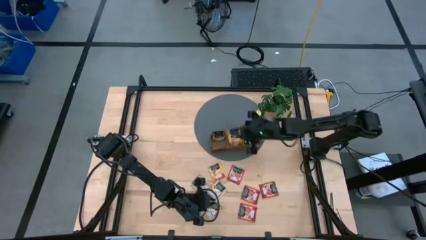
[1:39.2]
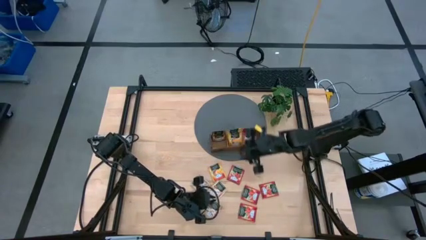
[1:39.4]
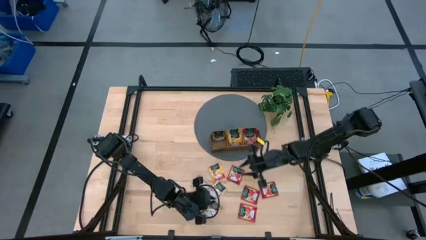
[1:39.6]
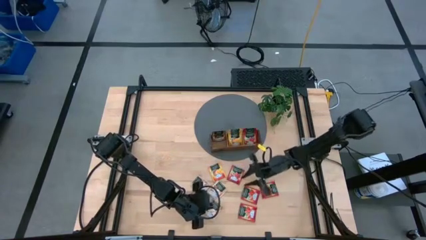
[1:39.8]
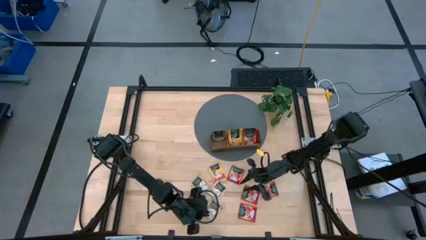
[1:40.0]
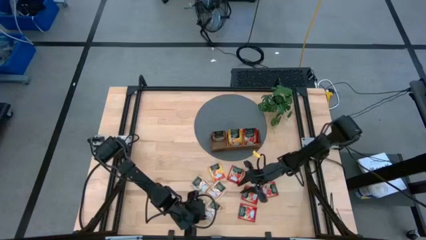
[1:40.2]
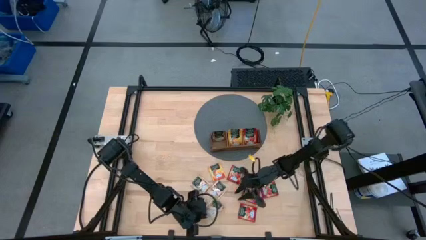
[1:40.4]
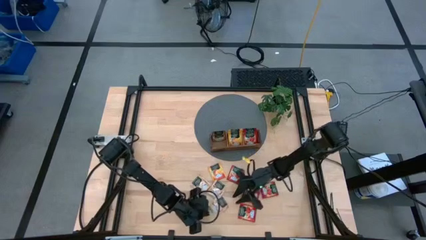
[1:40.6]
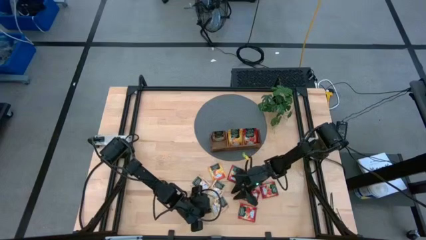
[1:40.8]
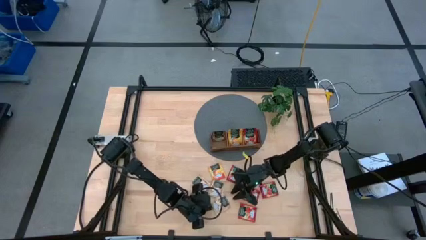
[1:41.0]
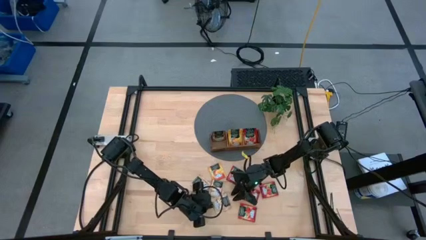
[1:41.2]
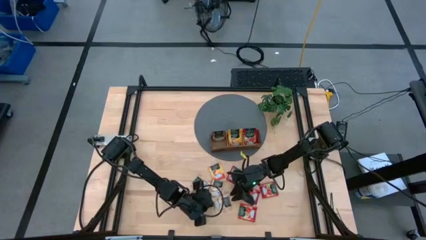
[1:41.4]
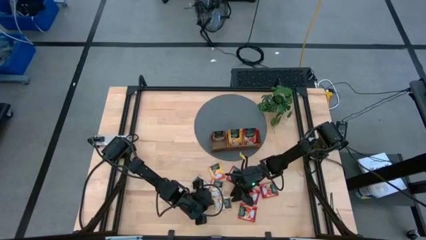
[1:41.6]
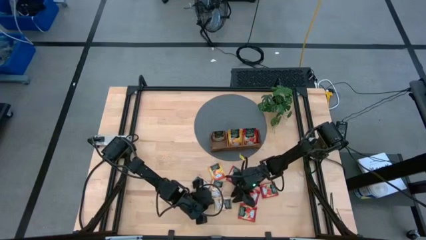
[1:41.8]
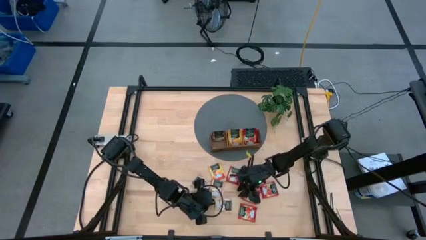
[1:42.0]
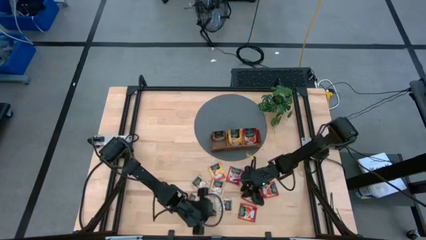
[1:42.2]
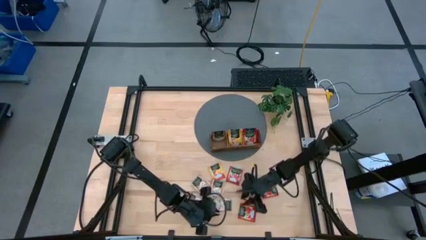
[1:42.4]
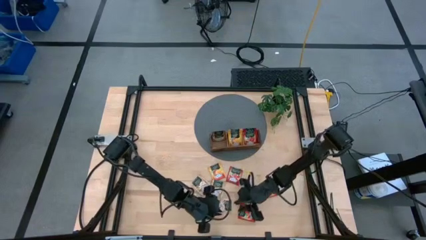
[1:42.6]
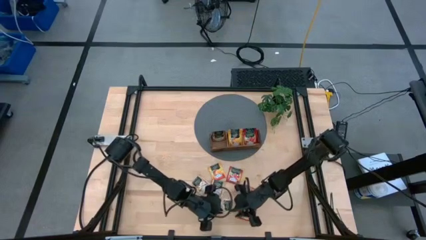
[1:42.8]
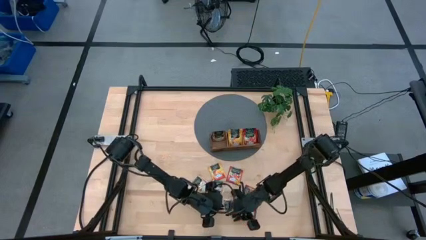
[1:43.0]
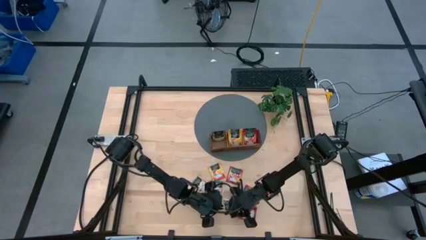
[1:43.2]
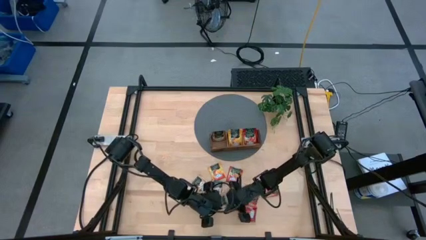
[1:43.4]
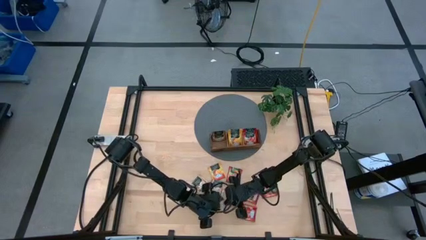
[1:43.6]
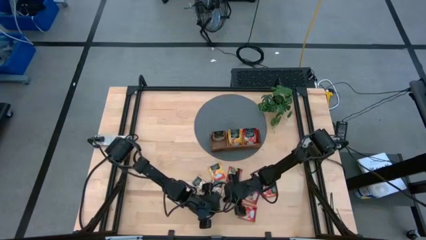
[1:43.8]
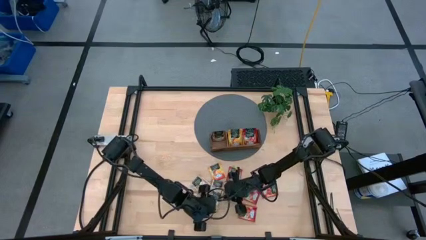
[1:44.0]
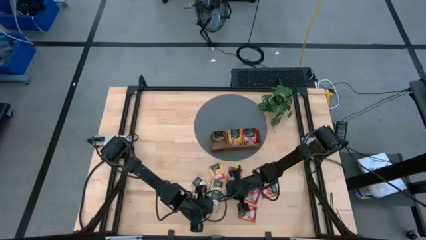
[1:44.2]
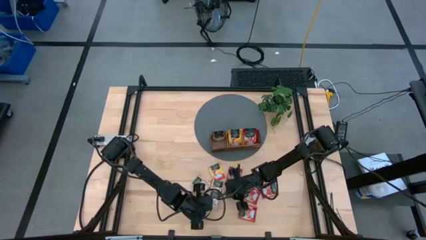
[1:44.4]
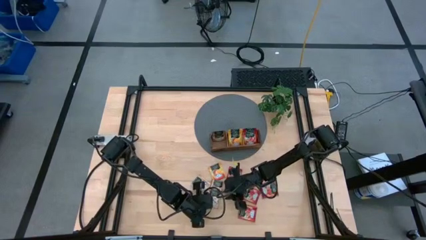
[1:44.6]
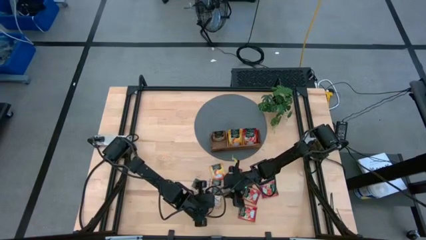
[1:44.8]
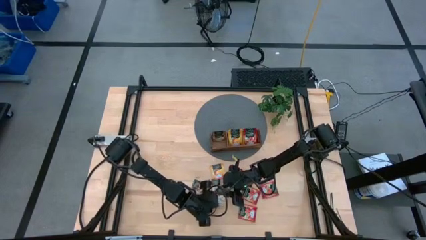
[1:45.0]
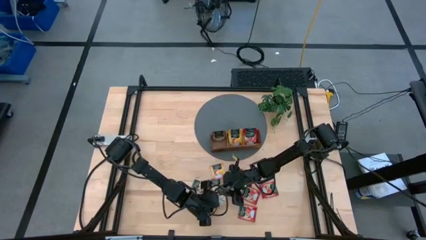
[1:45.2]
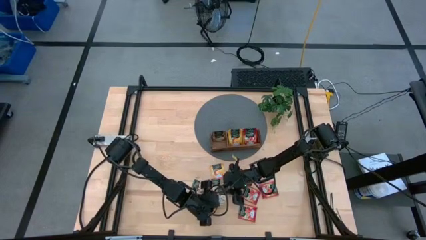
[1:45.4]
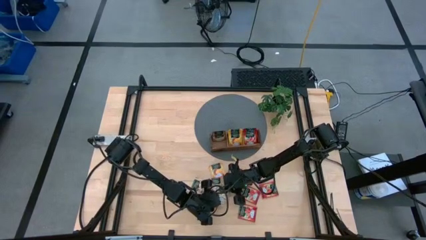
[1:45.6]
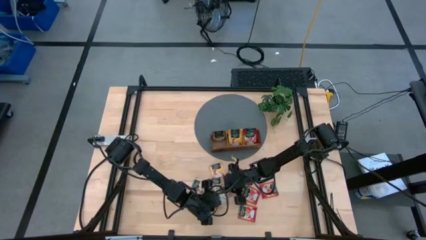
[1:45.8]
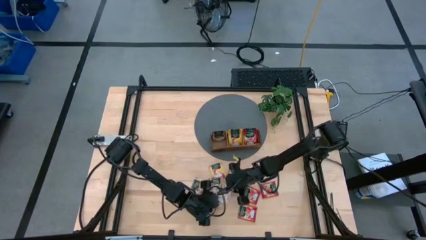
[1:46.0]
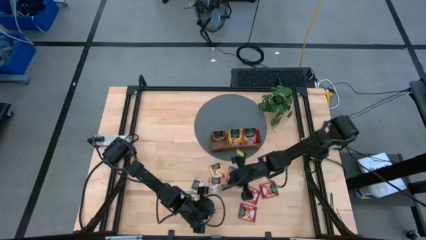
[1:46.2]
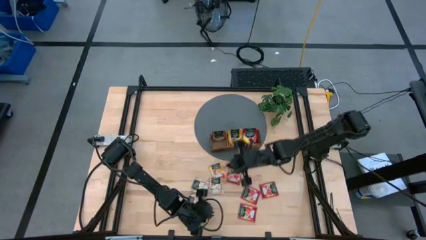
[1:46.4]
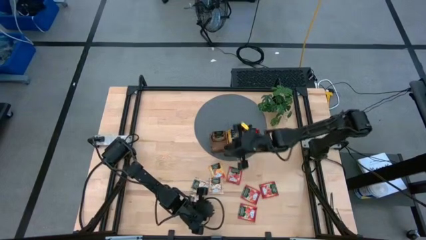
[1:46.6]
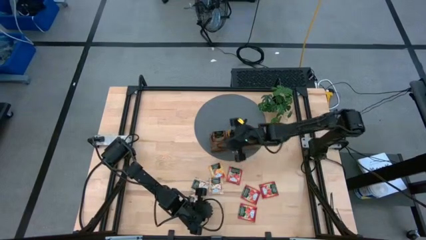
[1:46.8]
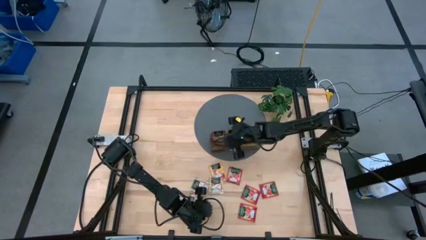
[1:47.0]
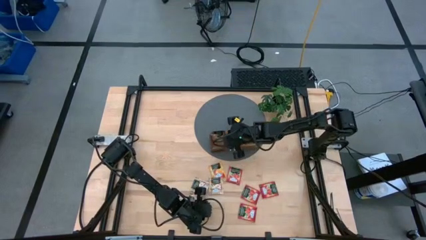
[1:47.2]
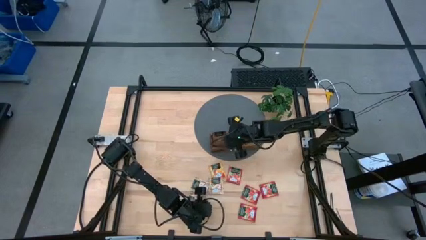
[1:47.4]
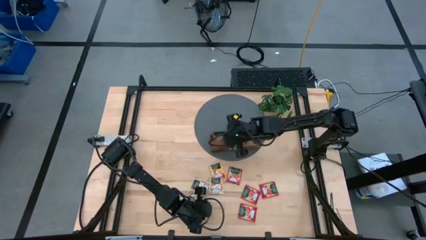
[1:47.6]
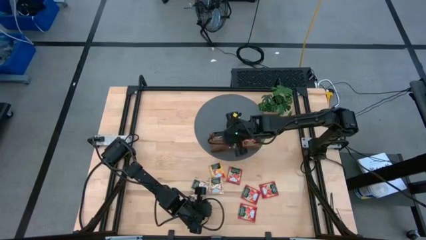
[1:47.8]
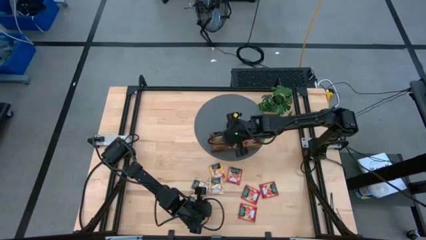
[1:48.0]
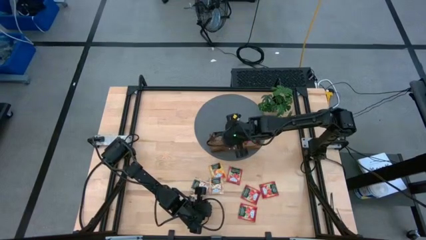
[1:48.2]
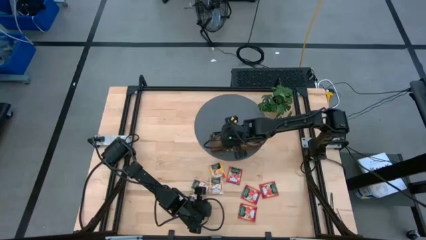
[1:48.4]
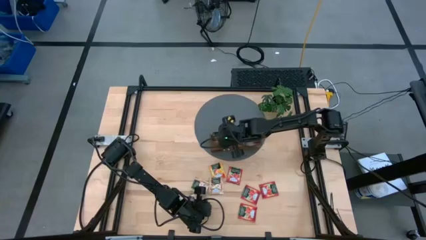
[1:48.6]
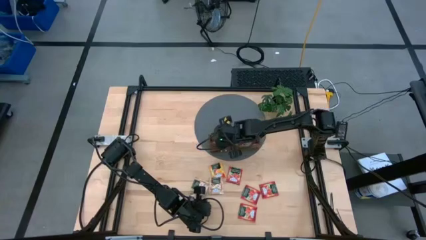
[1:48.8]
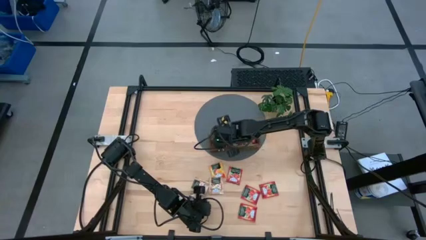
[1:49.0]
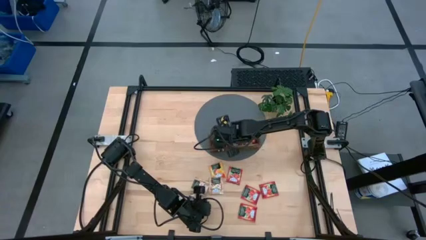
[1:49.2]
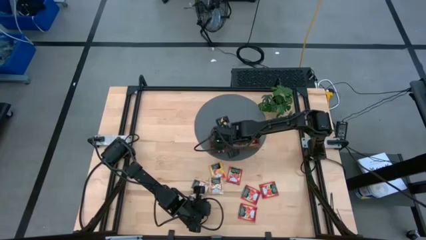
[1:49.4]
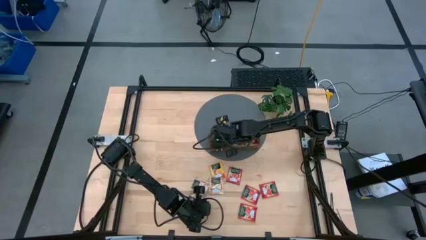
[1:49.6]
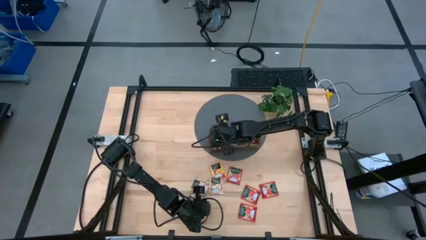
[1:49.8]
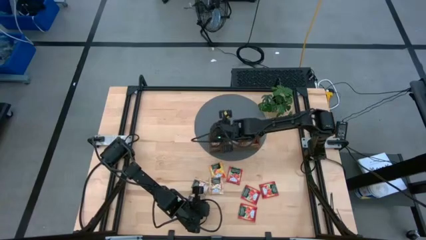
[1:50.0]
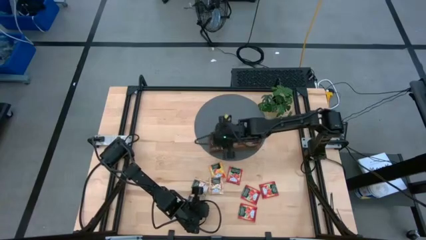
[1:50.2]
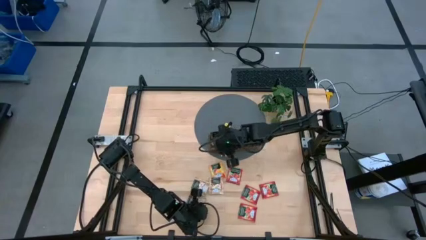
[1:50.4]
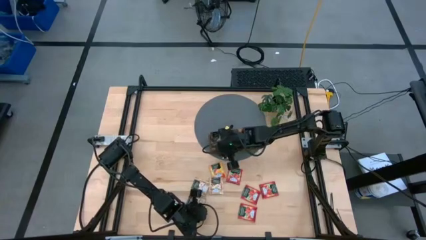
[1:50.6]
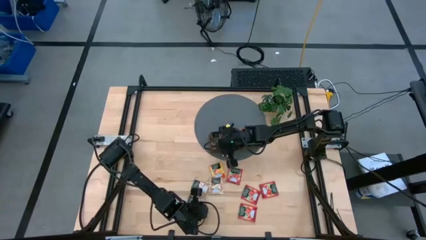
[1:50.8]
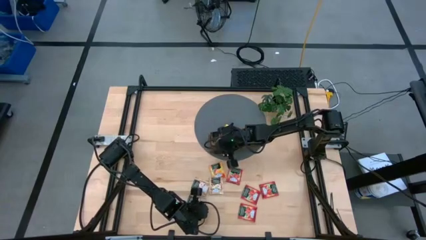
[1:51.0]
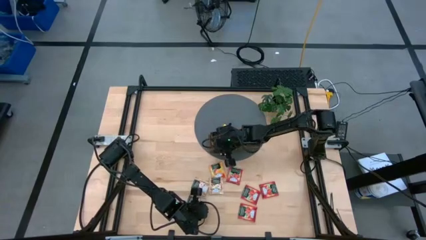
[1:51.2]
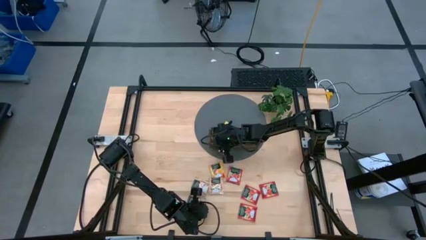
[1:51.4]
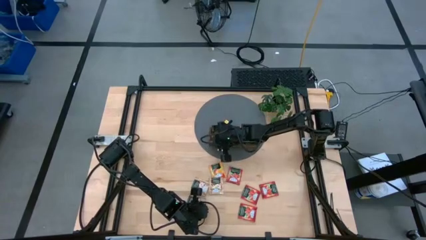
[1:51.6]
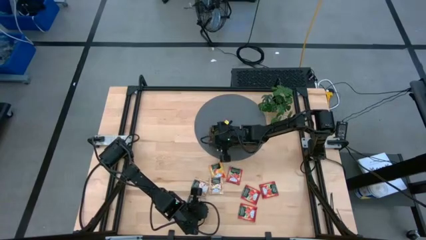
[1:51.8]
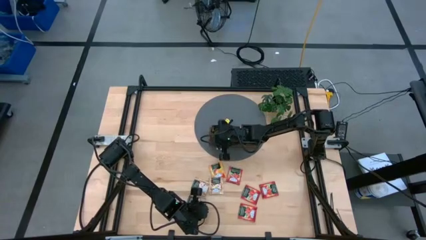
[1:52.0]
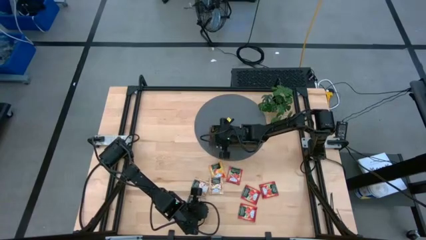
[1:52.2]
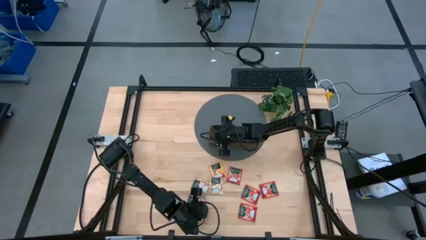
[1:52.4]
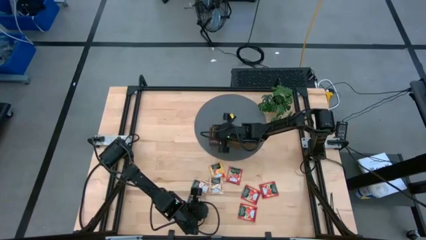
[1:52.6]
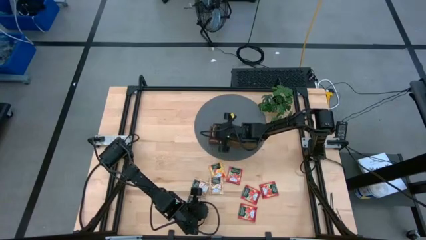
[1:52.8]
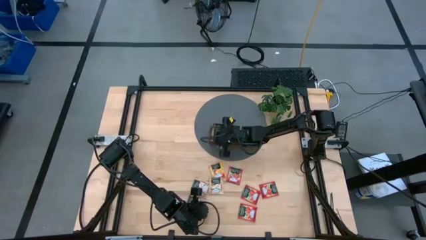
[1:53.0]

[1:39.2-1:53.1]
Task: Pick & Place Tea
Put the brown tea bag into the left section of the wooden organizer

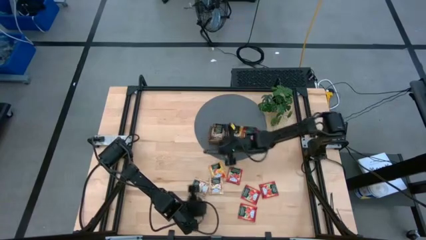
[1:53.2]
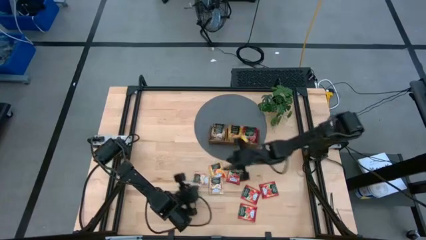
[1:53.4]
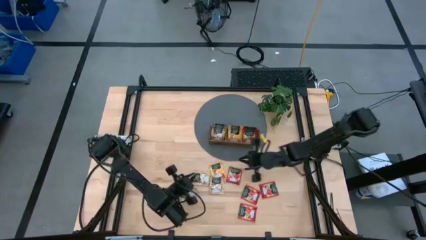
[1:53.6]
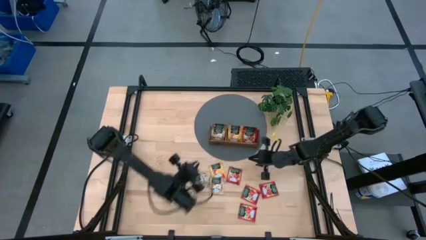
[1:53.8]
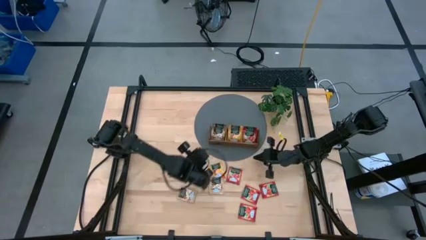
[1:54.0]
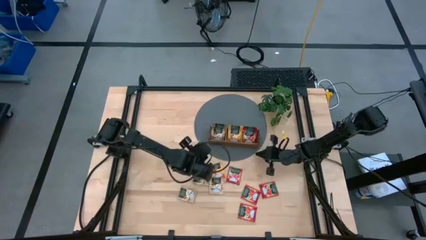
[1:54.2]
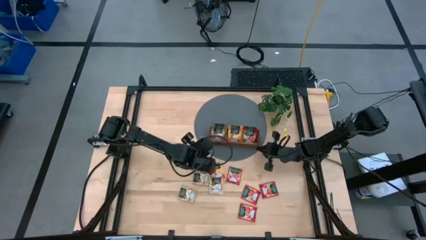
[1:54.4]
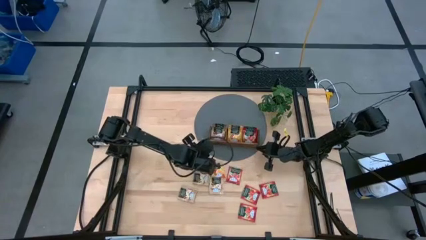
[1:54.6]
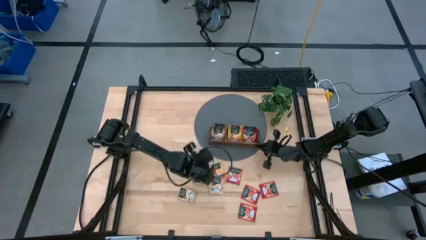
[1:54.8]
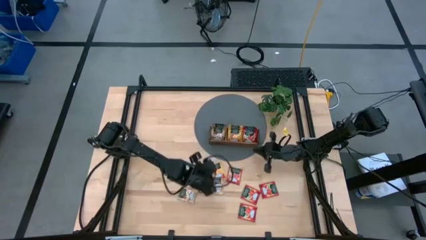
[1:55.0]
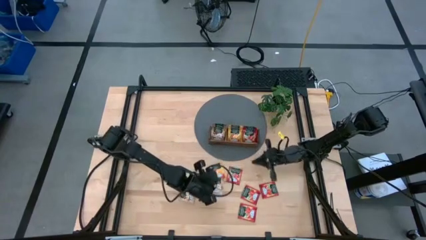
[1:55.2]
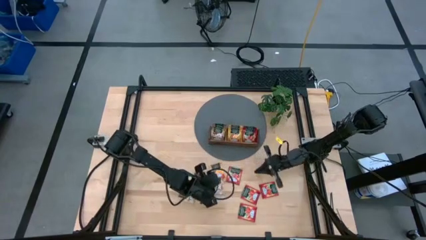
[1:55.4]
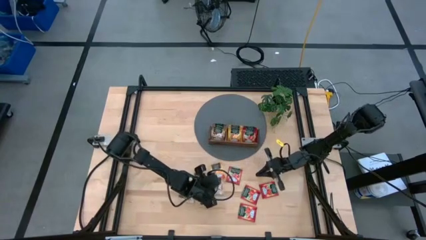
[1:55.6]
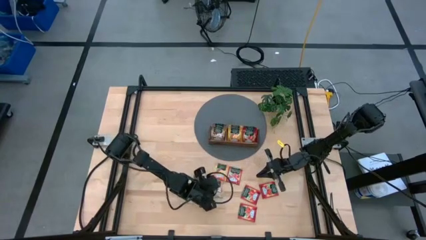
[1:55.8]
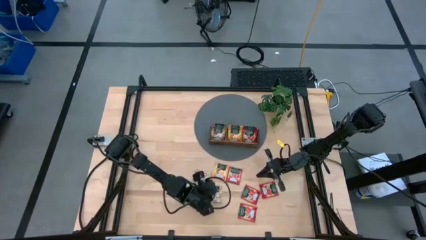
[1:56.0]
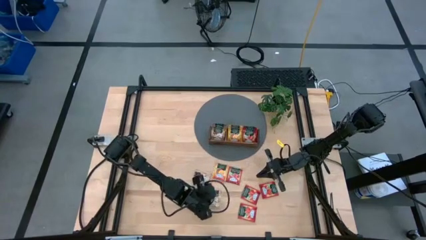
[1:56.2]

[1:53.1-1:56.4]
Adjust the brown tea bag
